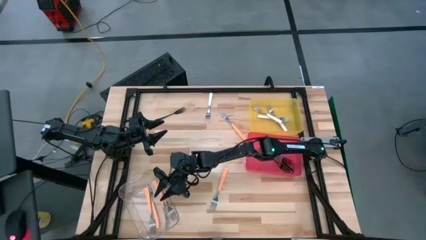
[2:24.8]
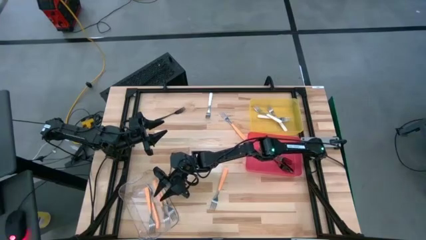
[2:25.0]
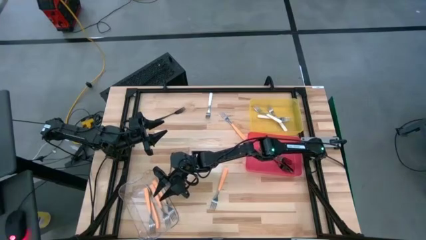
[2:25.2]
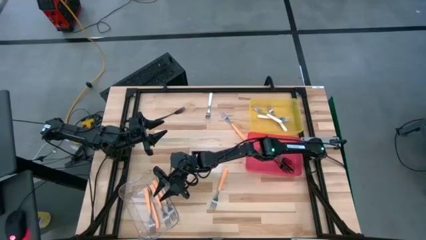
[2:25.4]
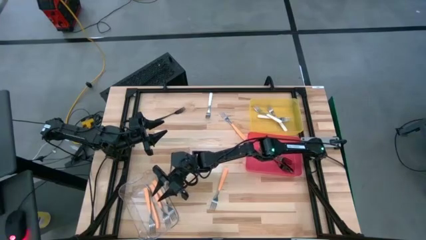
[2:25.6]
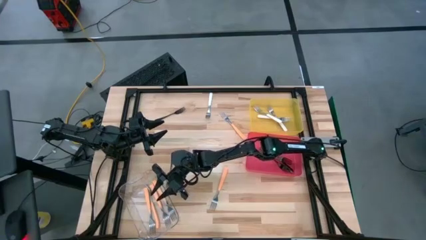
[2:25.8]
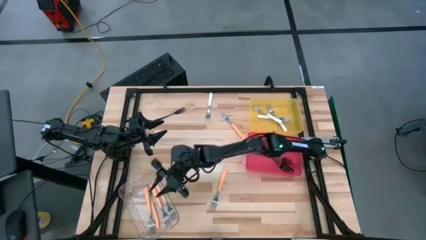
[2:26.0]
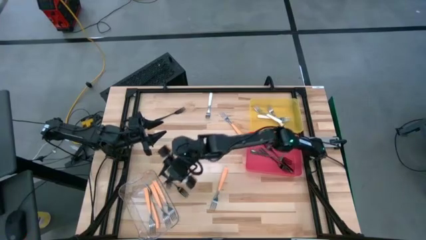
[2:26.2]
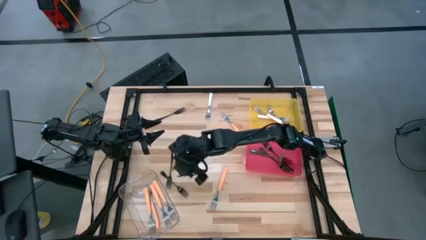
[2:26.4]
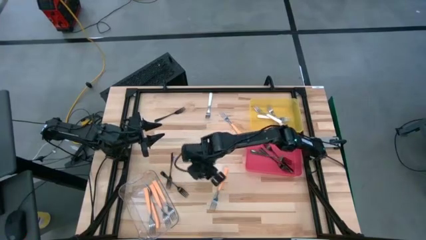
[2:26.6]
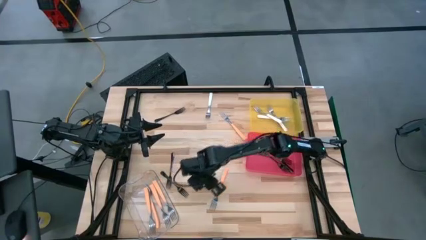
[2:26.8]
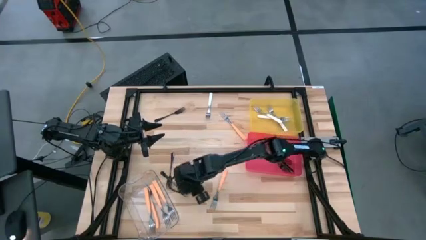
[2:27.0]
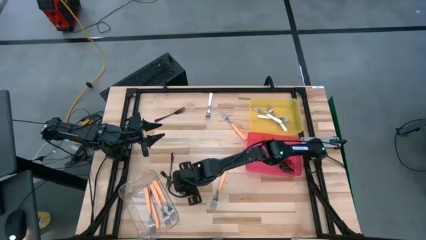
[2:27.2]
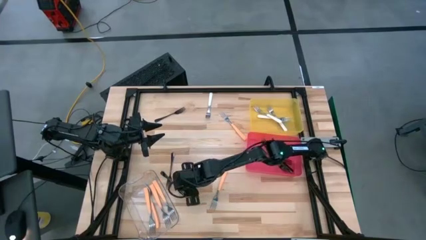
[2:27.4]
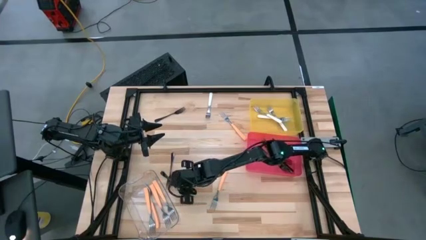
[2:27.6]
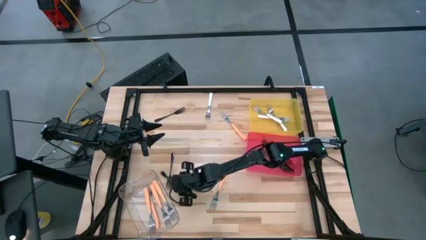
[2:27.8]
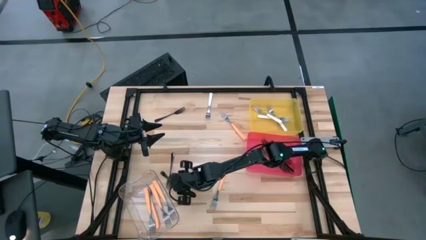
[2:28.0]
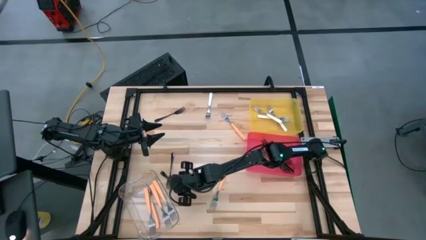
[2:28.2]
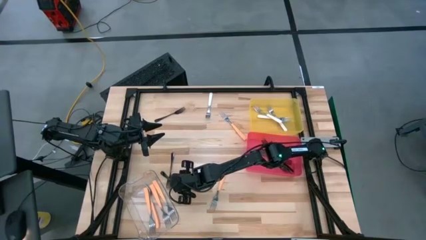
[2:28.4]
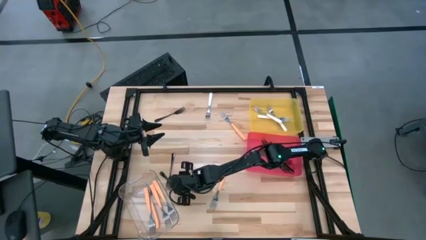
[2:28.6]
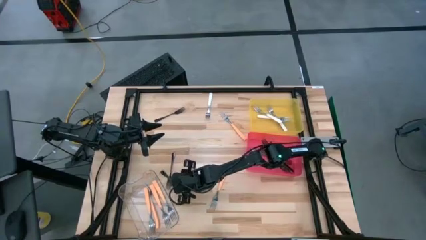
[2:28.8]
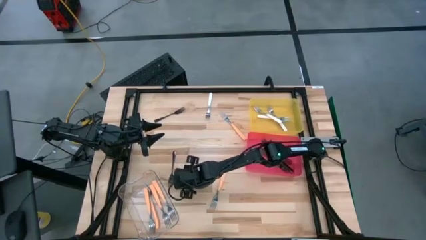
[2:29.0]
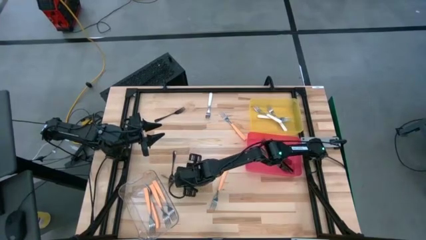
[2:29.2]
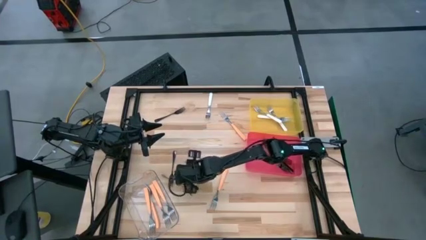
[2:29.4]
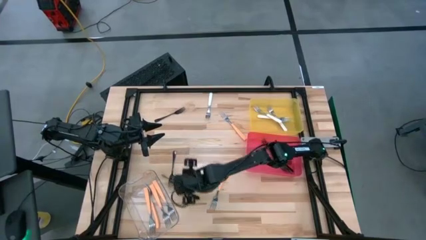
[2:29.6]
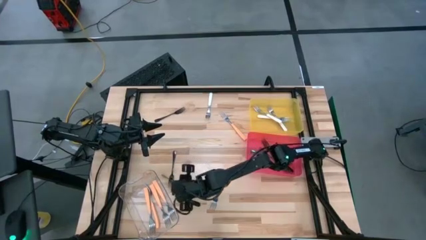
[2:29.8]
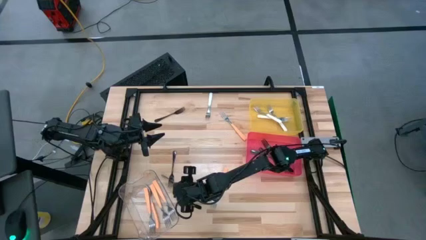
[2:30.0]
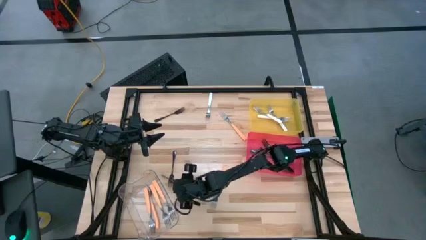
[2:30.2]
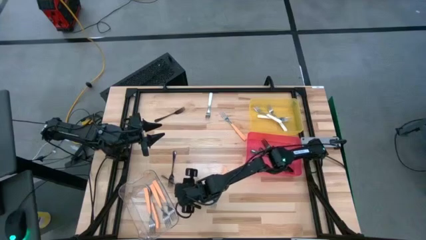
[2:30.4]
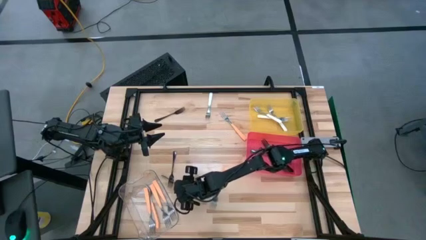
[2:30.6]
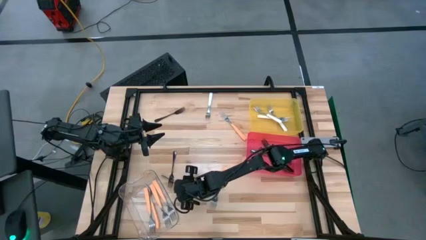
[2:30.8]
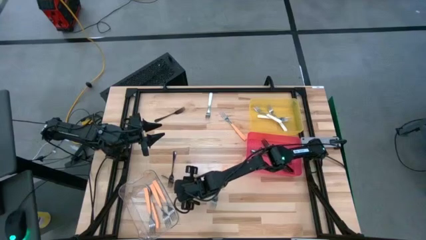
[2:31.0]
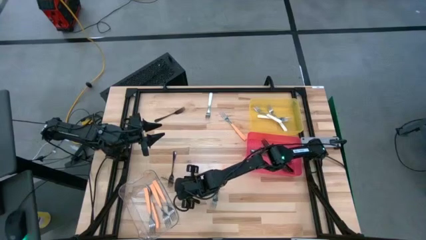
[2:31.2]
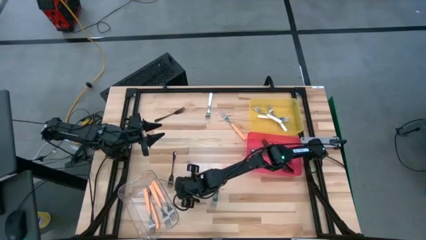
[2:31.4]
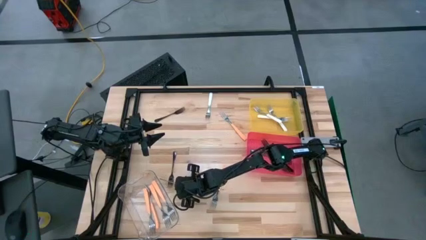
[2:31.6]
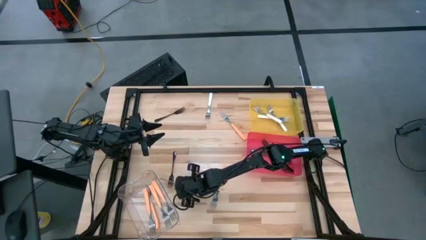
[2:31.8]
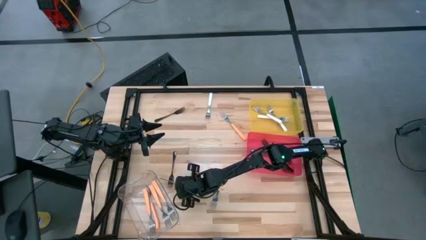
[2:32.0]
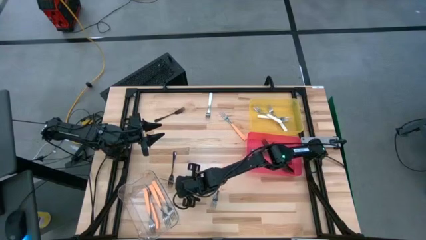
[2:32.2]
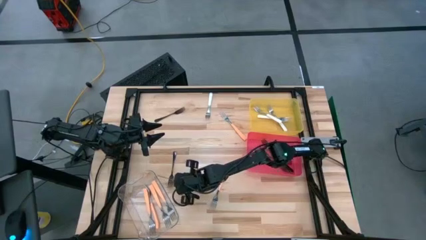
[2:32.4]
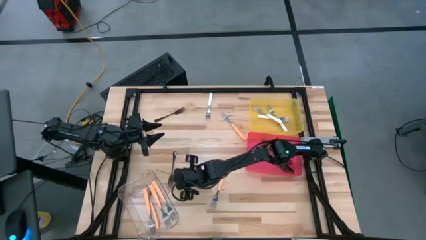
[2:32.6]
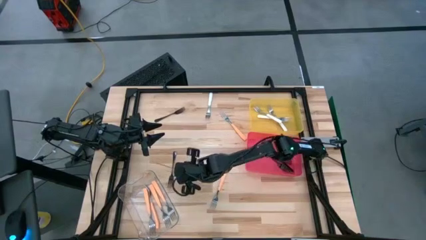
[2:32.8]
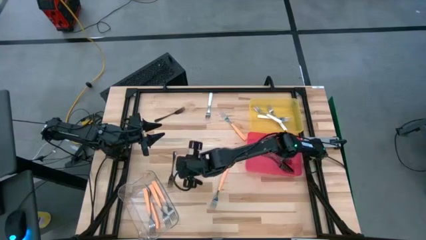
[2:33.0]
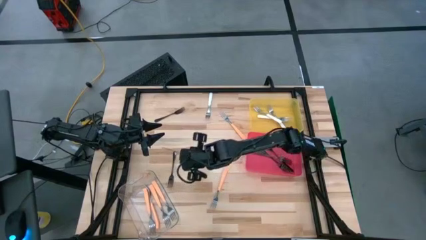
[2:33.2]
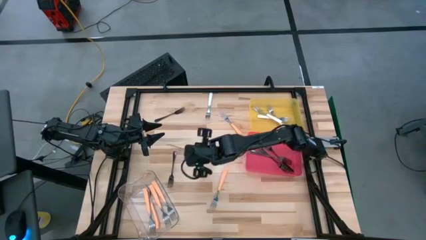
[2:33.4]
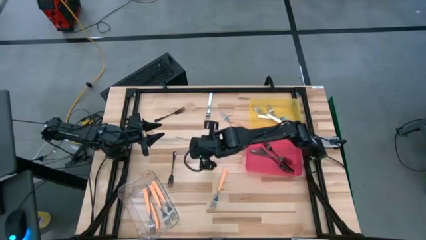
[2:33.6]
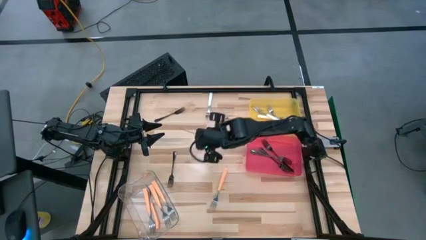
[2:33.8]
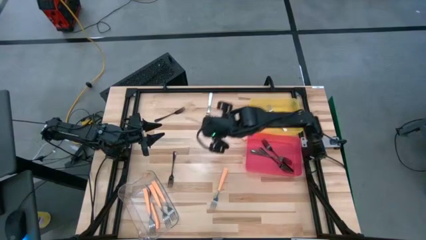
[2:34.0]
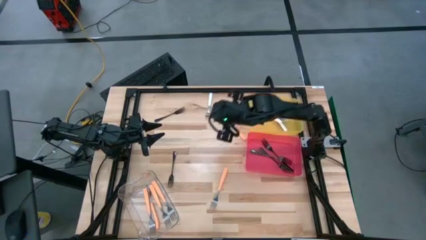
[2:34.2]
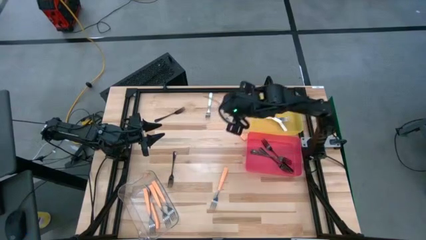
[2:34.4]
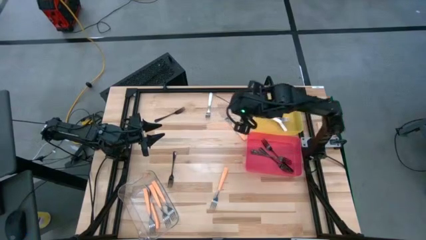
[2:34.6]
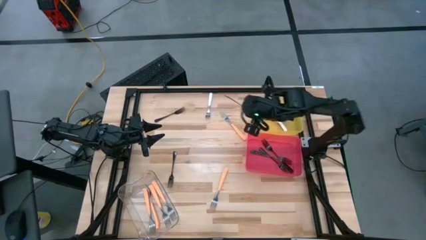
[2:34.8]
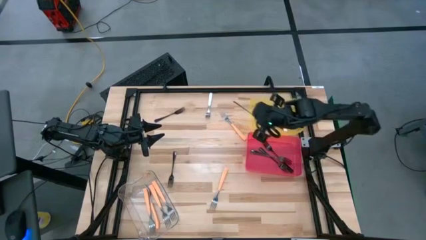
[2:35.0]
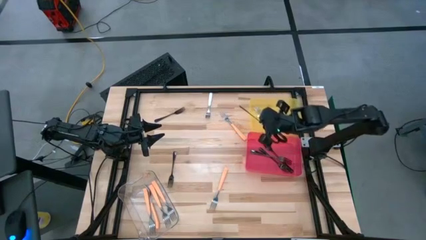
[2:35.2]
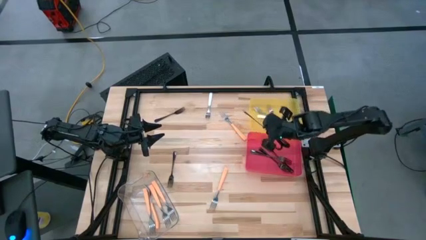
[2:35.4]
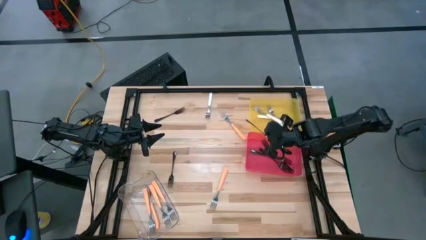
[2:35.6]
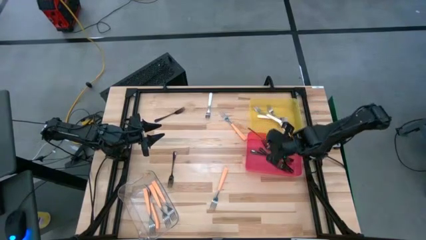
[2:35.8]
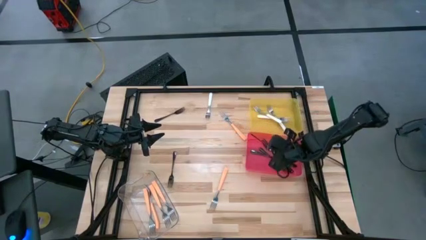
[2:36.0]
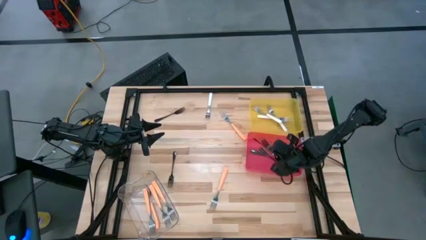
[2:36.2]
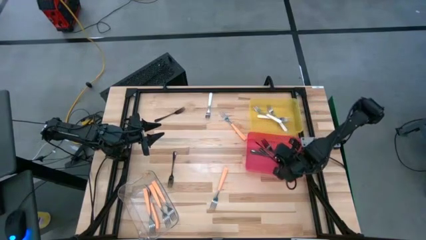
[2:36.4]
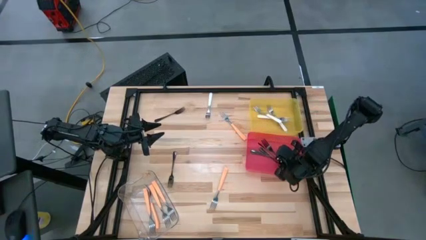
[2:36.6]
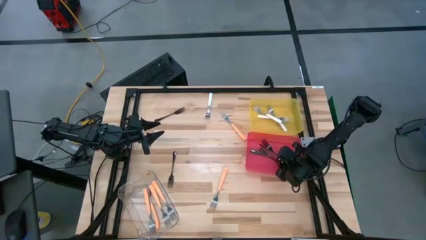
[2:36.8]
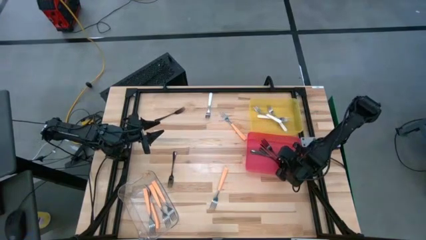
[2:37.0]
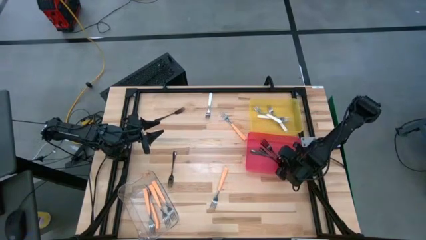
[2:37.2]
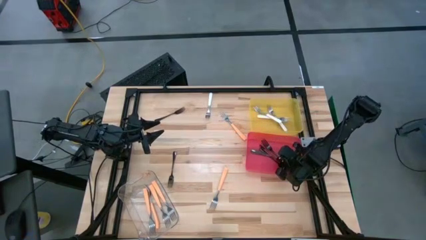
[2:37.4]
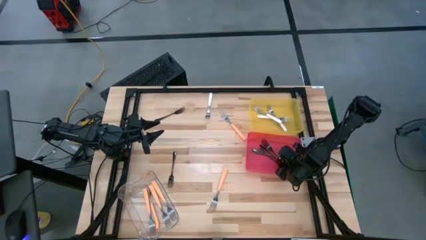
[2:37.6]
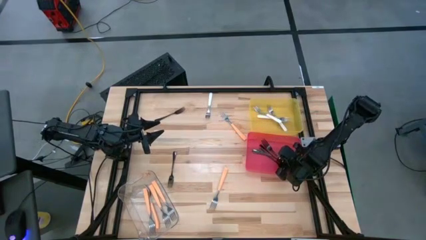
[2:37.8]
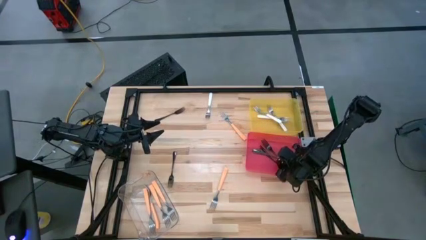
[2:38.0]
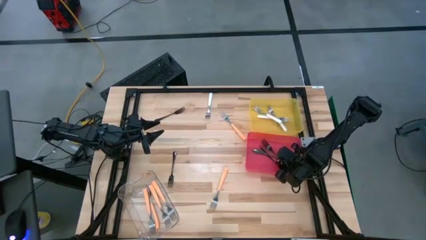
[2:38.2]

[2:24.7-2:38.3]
Task: Sort silverware by color (type)
Put the black fork into the red bin

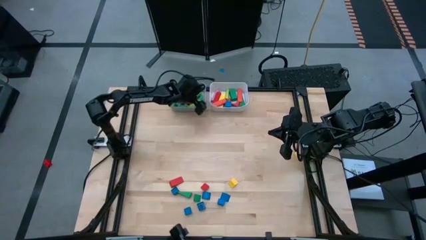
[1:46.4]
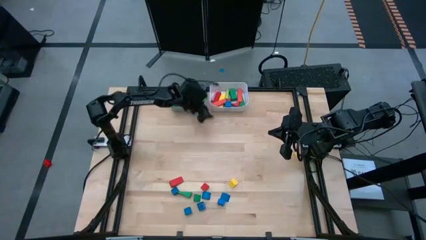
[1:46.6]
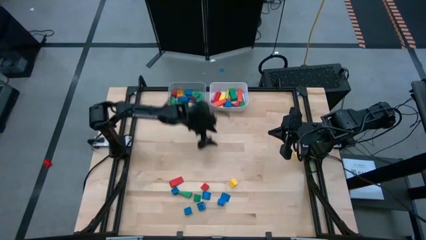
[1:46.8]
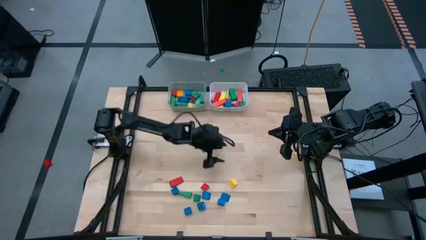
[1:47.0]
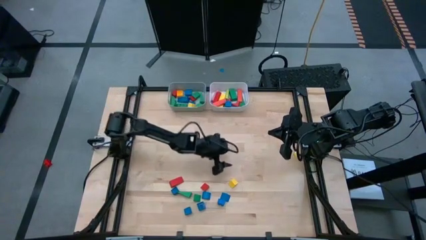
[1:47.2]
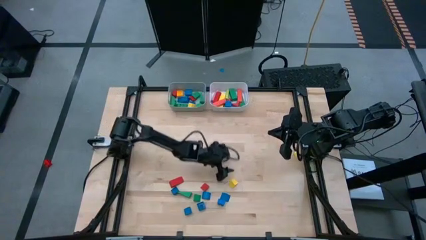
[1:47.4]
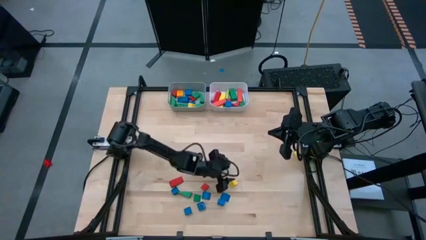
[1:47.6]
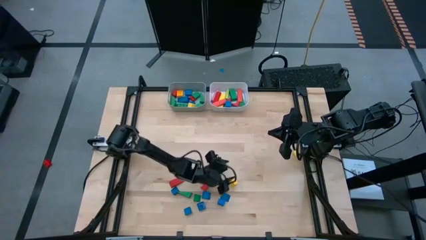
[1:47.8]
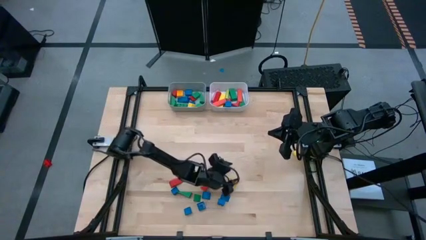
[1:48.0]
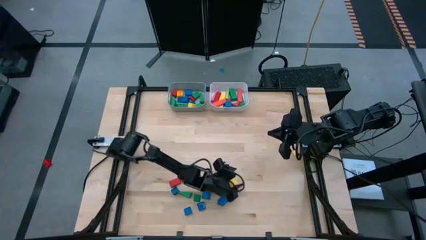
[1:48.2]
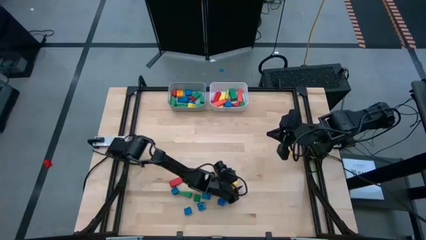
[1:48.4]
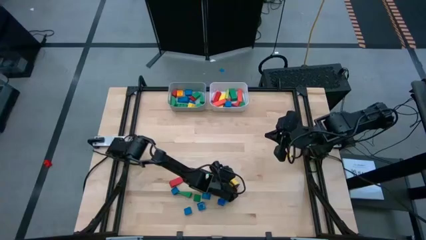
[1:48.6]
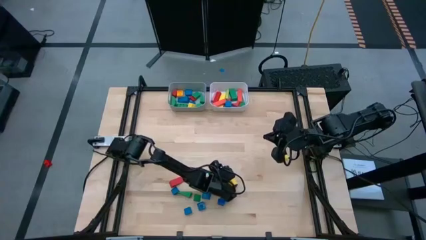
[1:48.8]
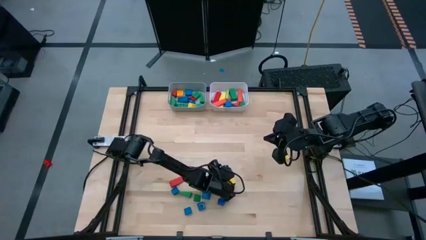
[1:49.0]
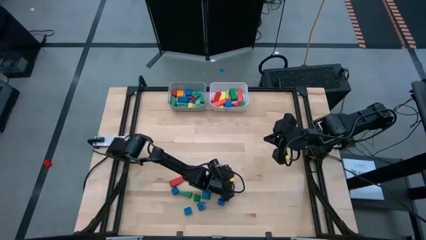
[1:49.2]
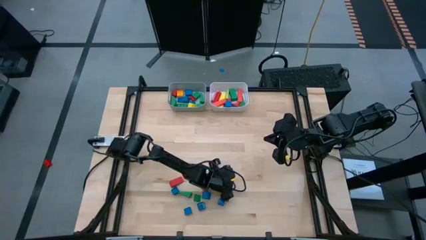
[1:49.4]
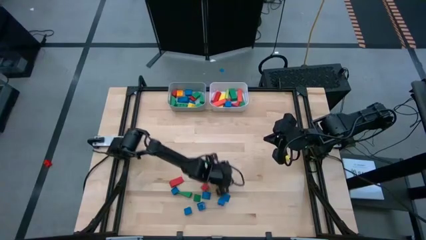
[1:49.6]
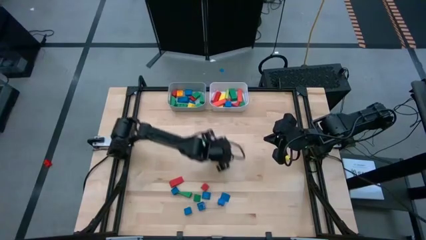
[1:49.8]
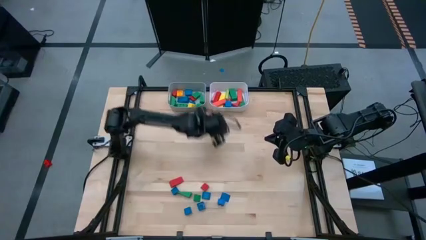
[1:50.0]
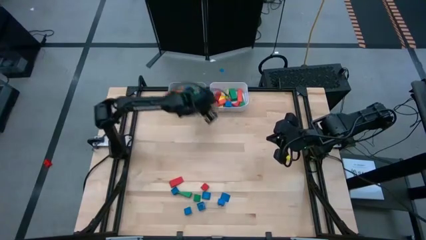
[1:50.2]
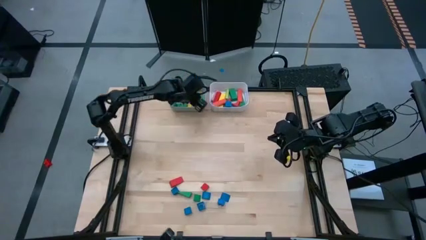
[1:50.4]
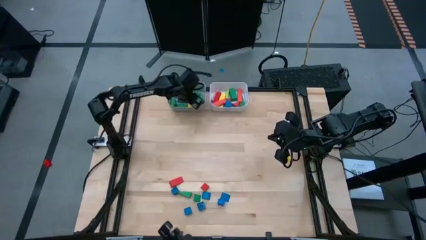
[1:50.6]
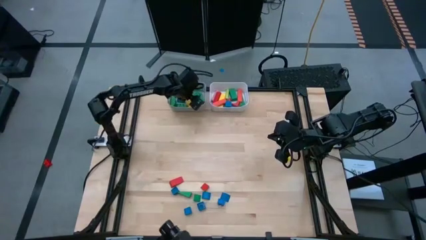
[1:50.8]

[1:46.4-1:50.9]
Task: Sort blocks by size
Put the yellow triangular block into the gray bin
